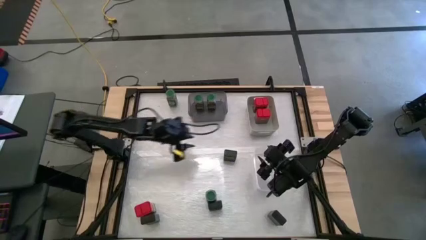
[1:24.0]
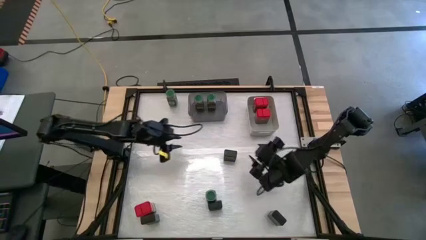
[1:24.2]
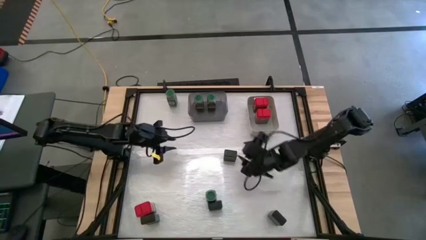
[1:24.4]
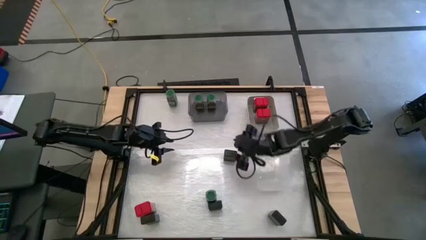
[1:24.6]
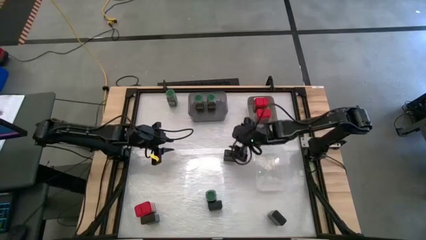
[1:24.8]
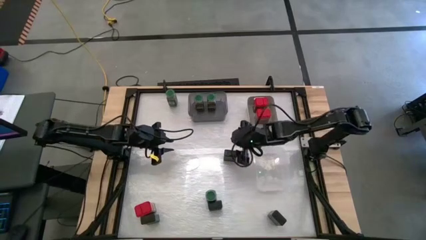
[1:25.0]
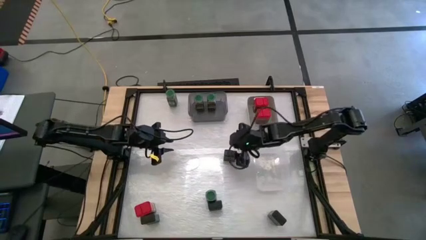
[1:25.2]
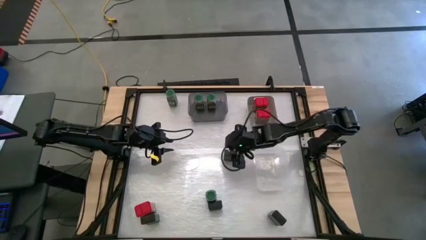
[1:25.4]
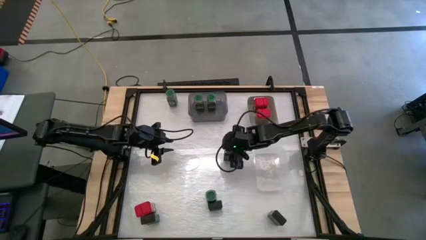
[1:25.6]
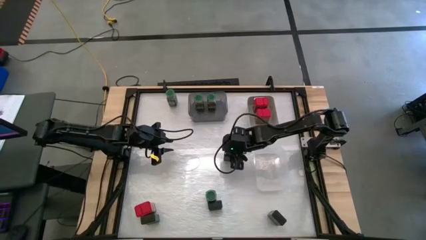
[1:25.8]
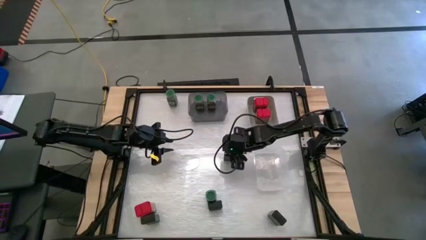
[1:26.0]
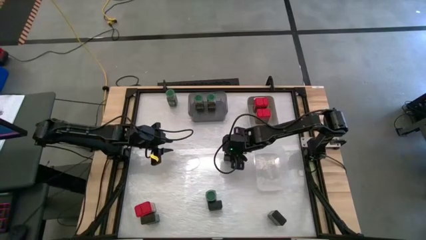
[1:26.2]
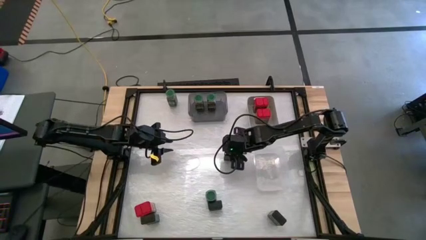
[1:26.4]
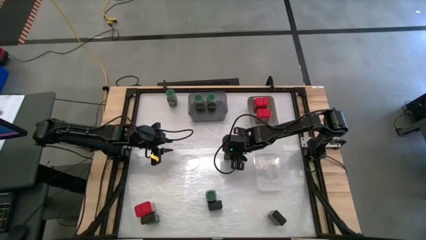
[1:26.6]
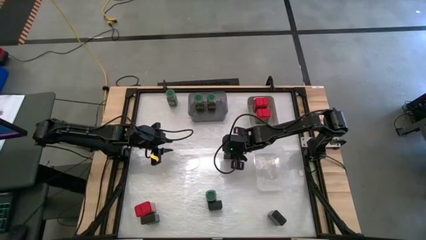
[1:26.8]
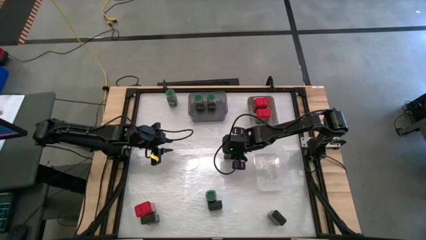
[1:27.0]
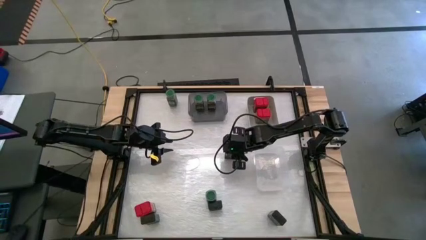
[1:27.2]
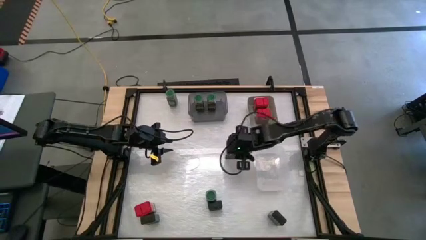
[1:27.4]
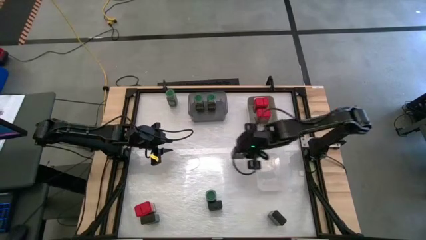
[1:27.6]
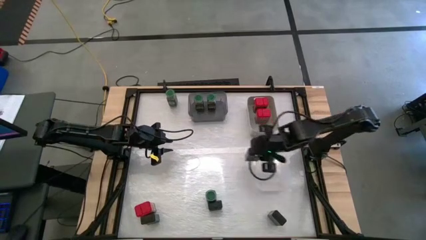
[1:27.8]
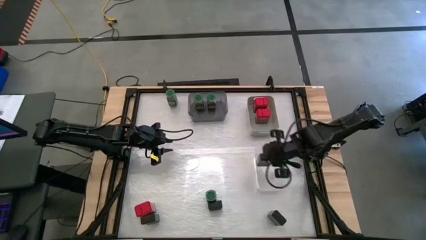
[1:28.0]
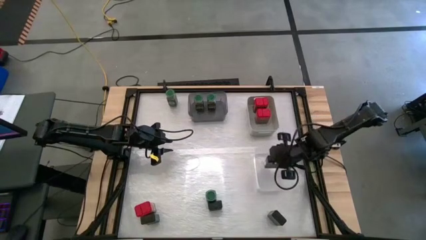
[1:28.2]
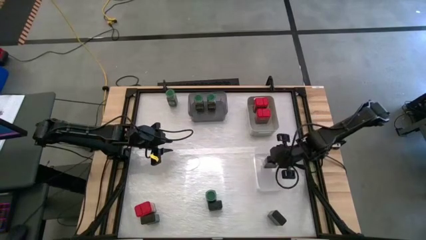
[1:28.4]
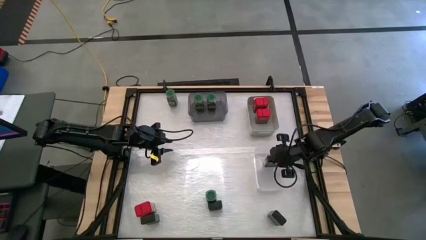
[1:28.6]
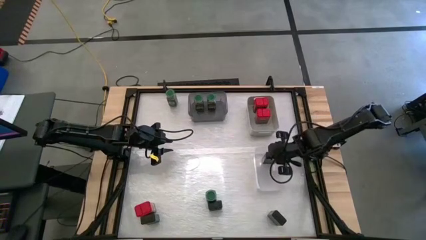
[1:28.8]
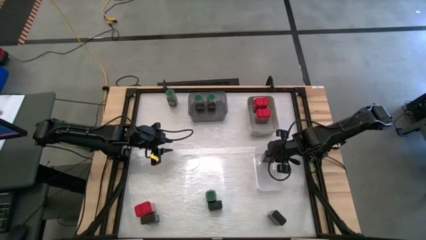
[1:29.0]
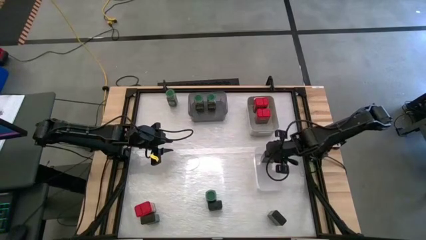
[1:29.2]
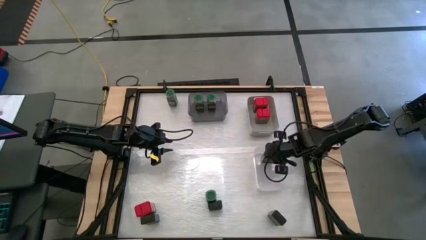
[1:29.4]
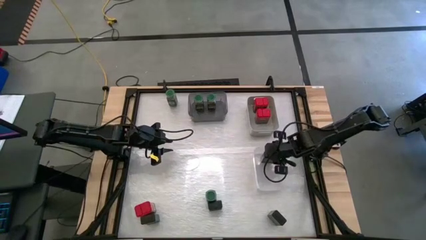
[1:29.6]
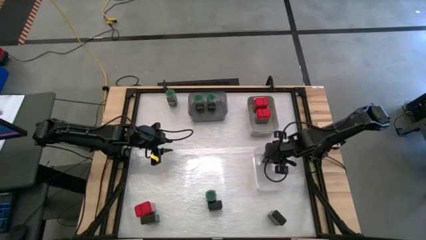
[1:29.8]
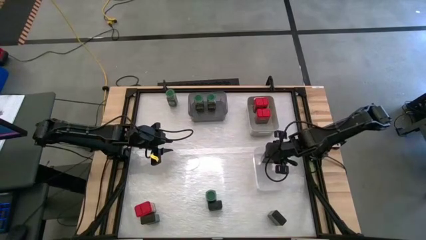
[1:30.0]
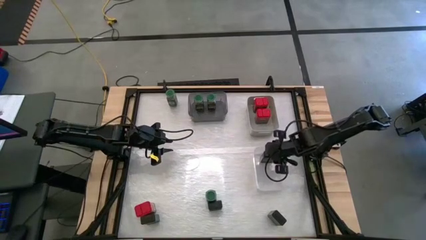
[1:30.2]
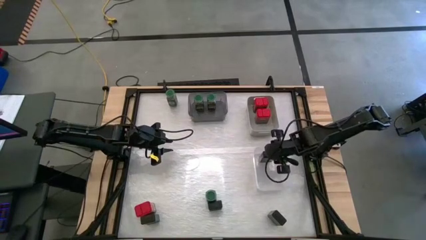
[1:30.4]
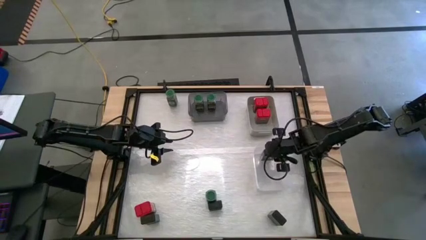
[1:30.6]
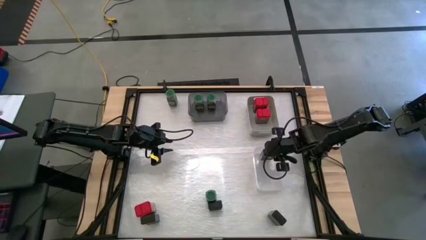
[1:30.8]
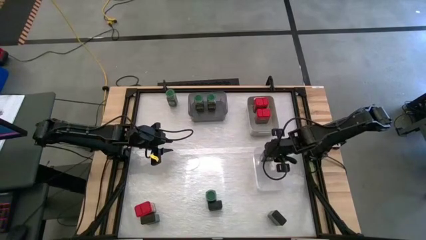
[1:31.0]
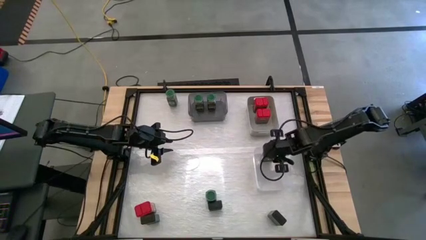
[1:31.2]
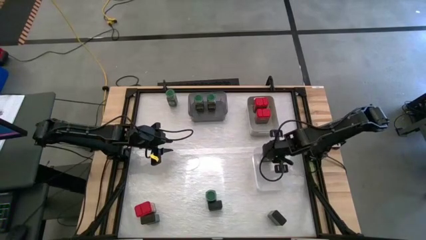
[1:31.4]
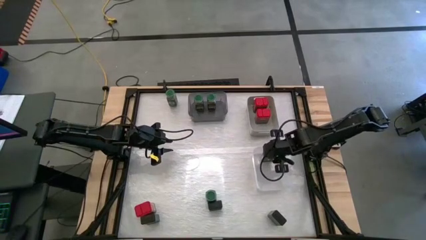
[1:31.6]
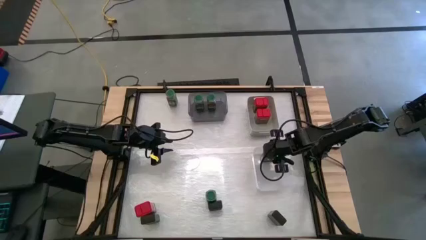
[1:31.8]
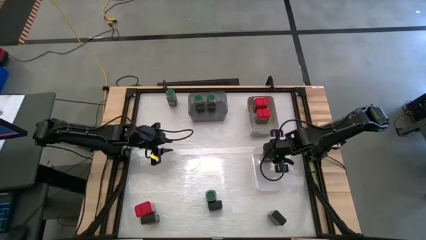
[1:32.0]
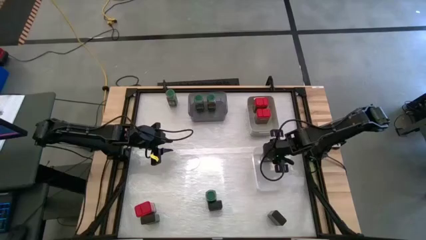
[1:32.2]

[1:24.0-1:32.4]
Task: Sort spices by type
Put the center black seasoning can into the white transparent bin

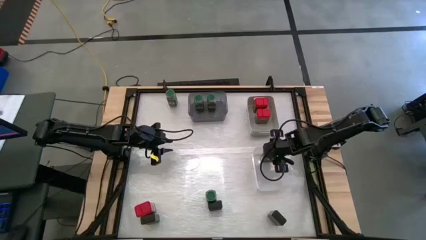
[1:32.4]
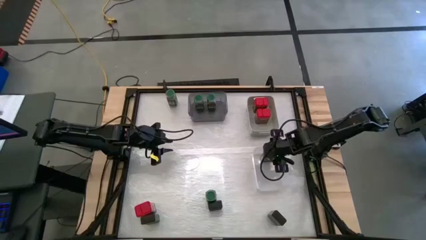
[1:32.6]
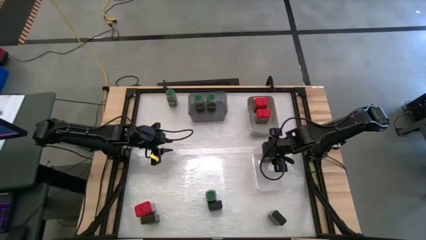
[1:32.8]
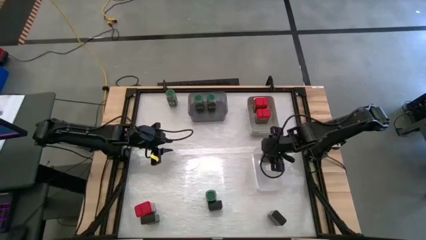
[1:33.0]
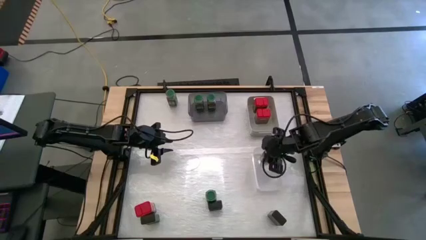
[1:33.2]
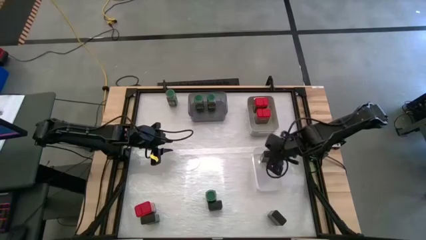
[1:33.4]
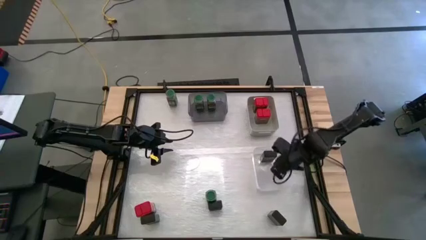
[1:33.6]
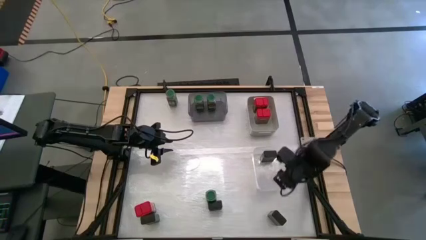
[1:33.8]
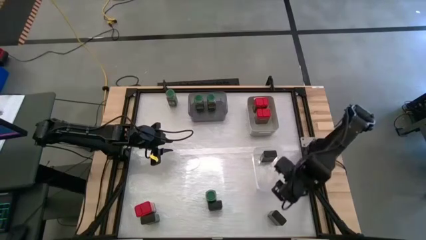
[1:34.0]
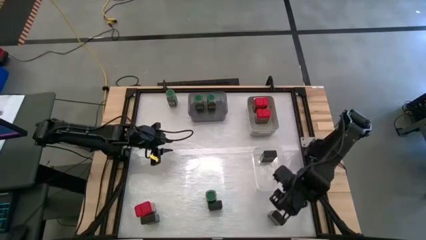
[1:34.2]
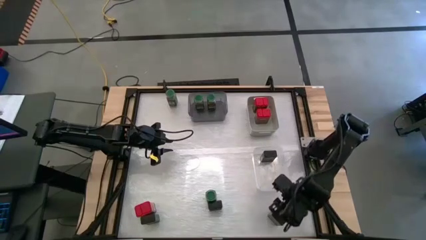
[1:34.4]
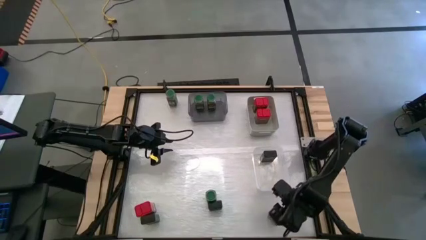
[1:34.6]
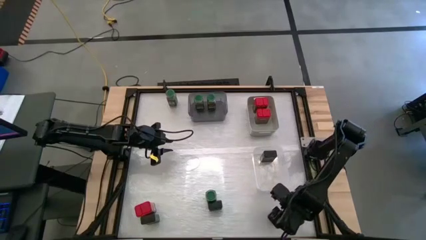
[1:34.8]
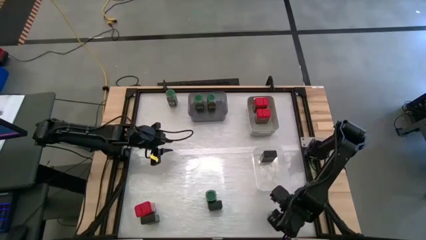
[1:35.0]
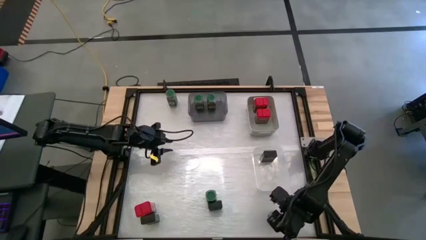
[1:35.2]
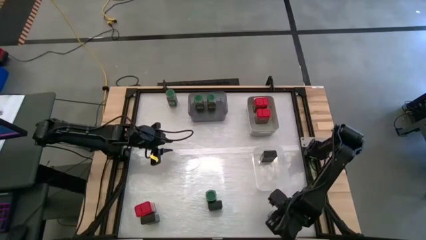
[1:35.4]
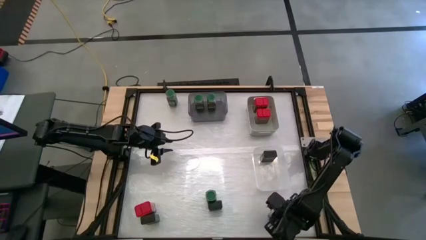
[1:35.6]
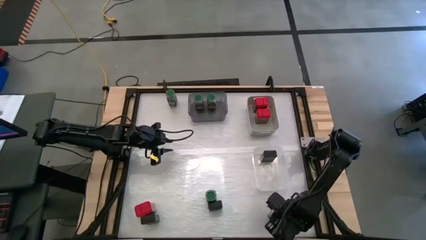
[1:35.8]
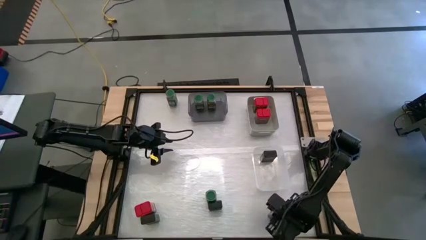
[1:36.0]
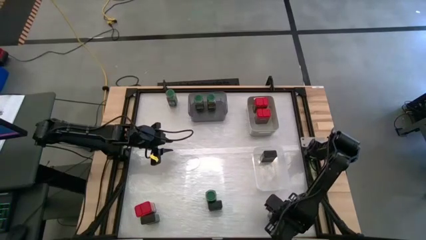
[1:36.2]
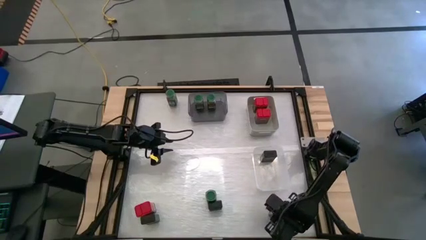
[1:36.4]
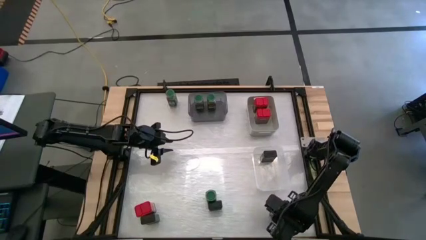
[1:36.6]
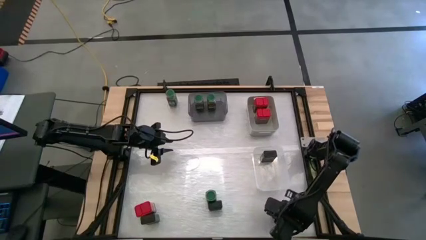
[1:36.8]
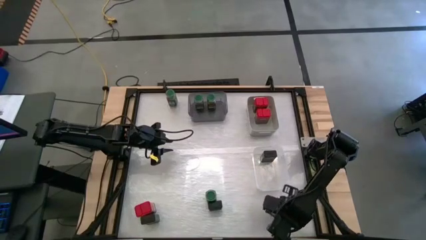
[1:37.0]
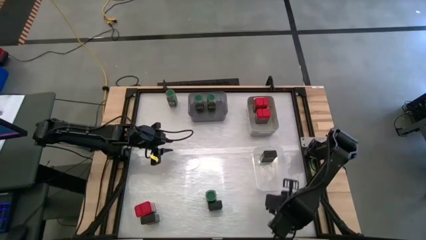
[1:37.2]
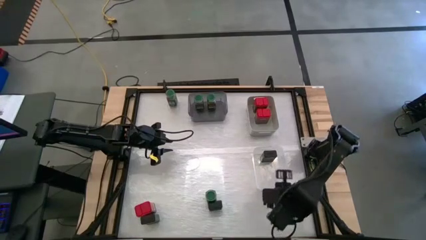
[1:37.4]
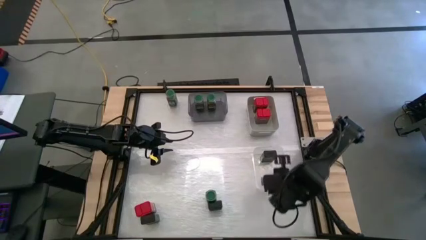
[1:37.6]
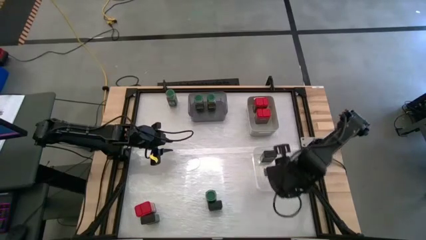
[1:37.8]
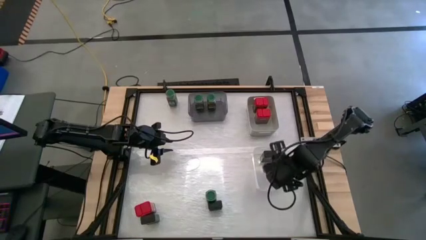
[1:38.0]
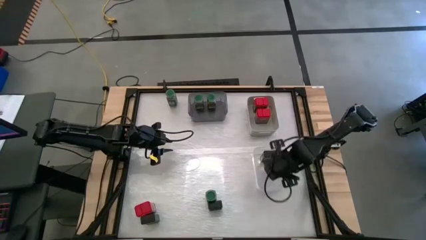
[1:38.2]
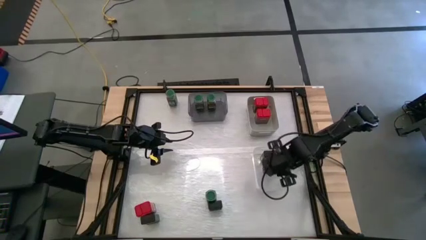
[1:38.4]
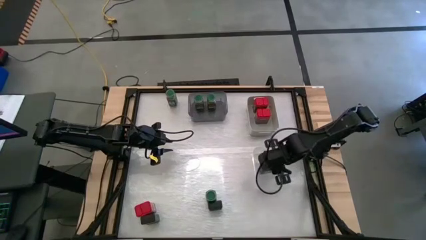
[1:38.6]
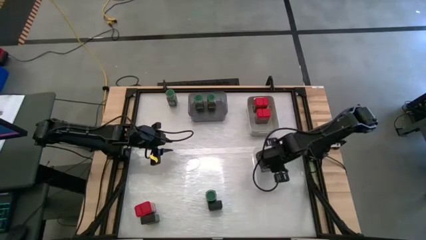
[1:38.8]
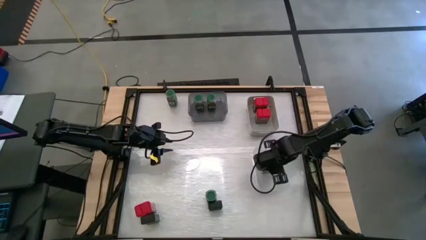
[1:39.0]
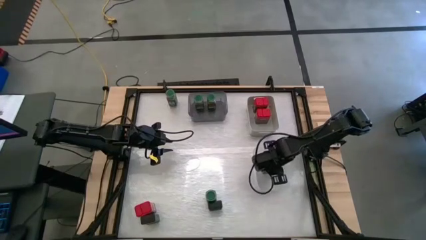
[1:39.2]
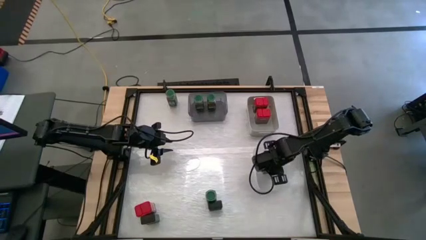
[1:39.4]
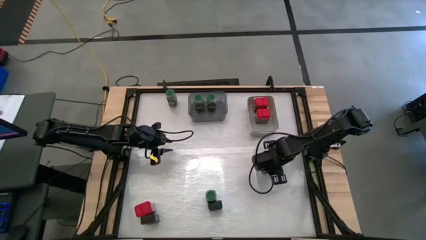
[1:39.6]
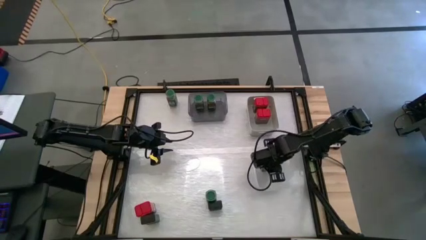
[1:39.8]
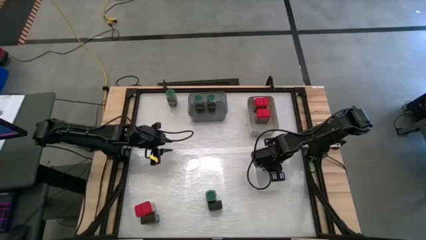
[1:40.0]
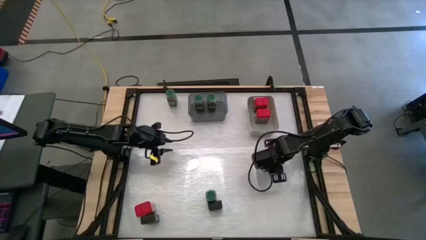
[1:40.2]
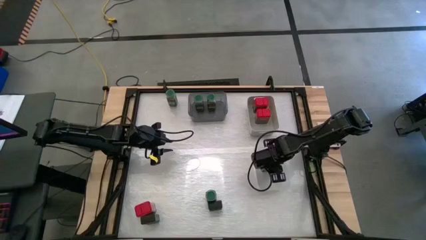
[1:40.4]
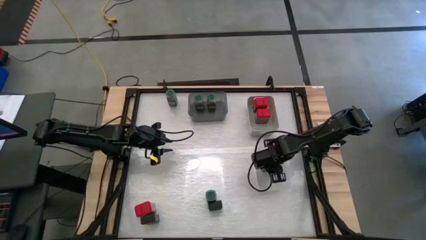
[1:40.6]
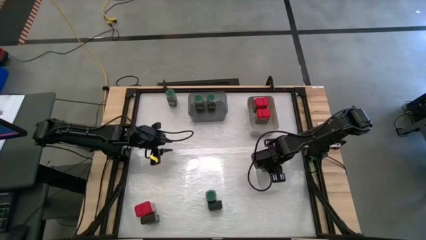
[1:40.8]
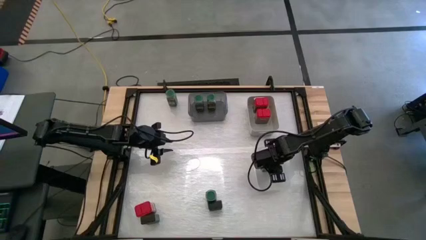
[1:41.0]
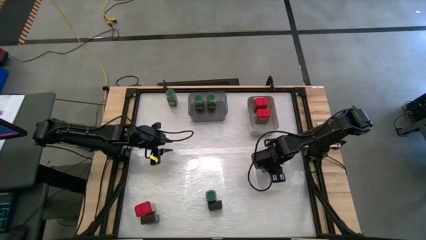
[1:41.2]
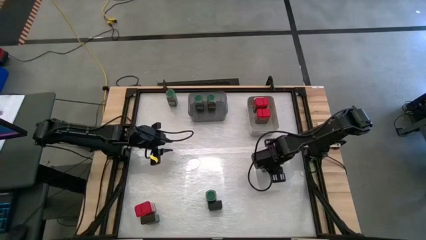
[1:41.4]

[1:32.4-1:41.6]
Put the bottom right black seasoning can into the white transparent bin
